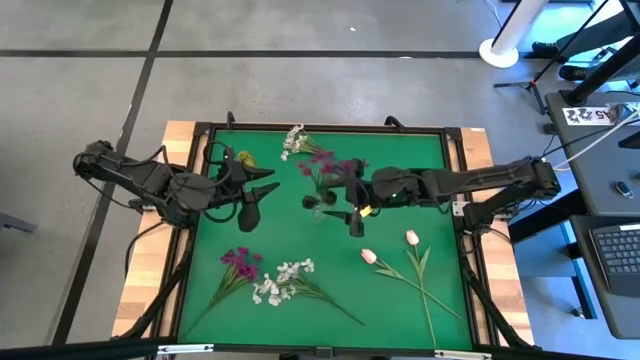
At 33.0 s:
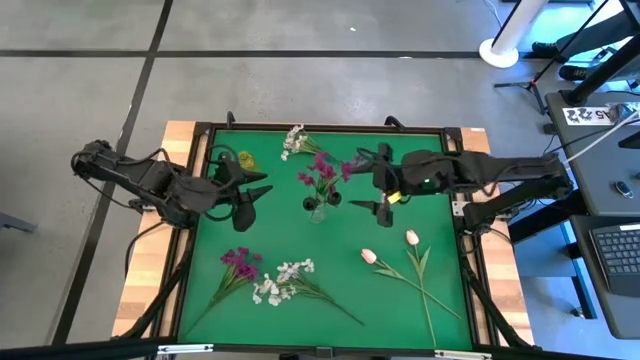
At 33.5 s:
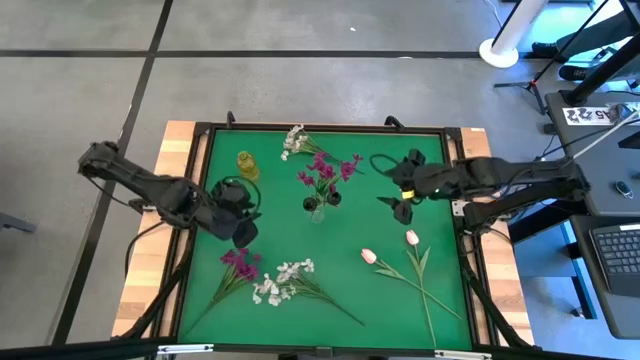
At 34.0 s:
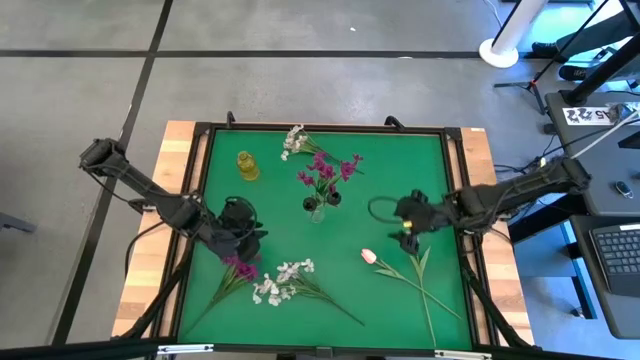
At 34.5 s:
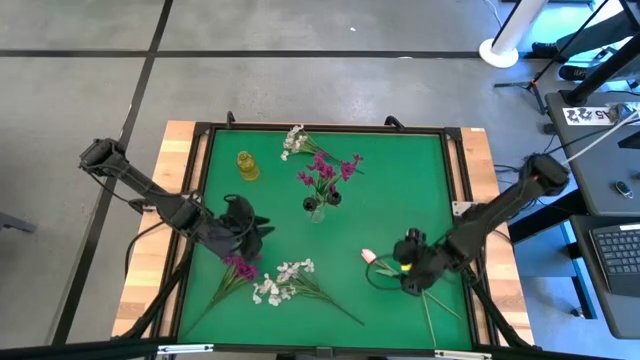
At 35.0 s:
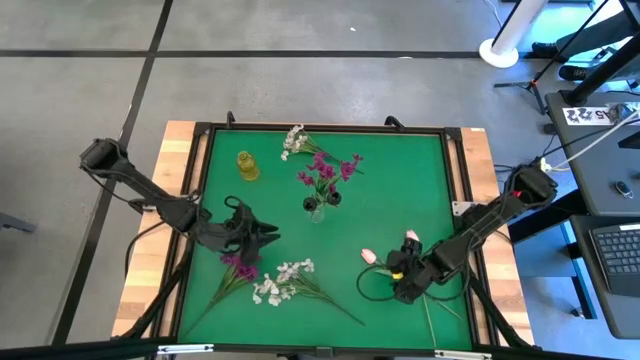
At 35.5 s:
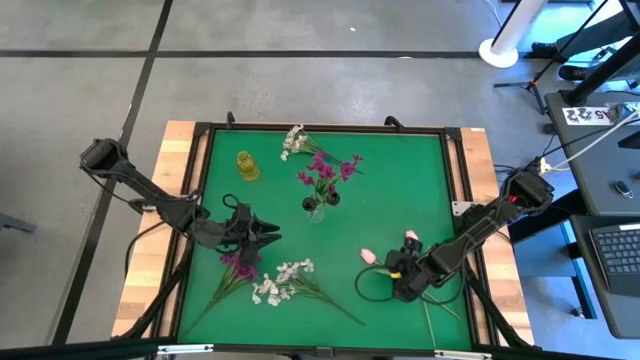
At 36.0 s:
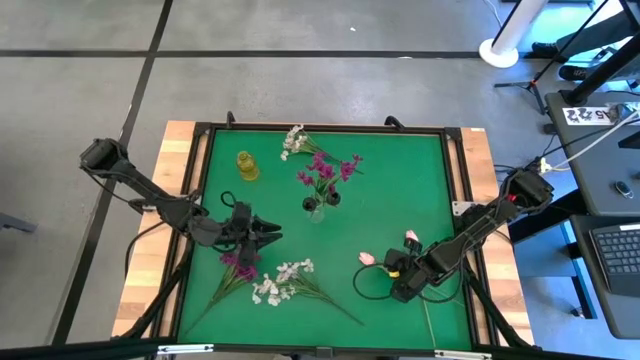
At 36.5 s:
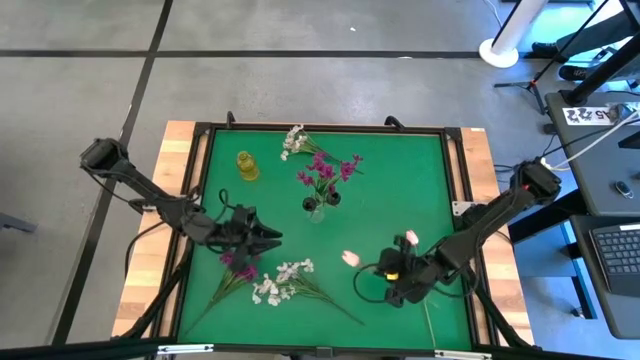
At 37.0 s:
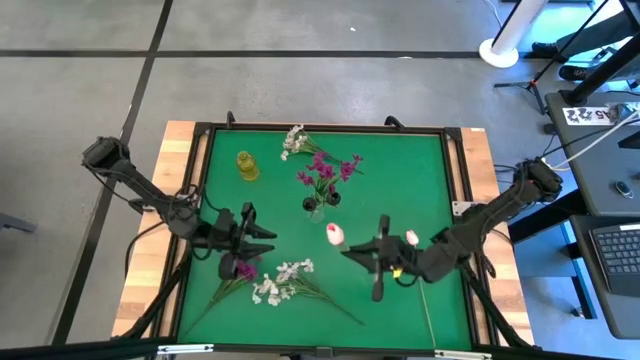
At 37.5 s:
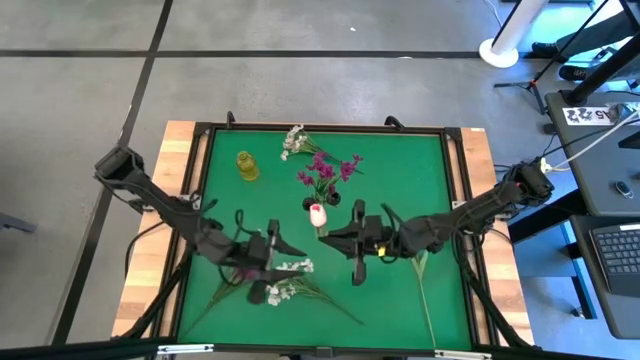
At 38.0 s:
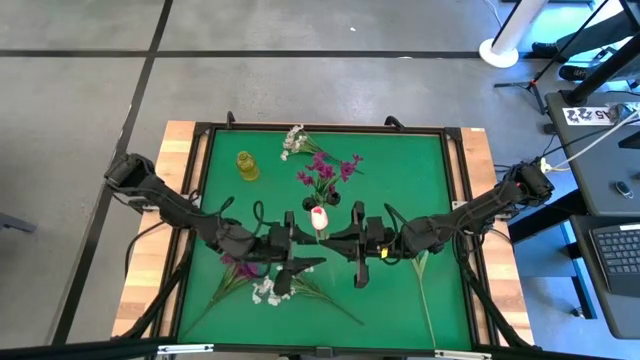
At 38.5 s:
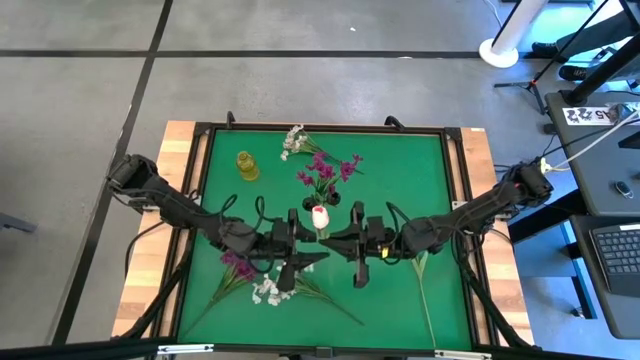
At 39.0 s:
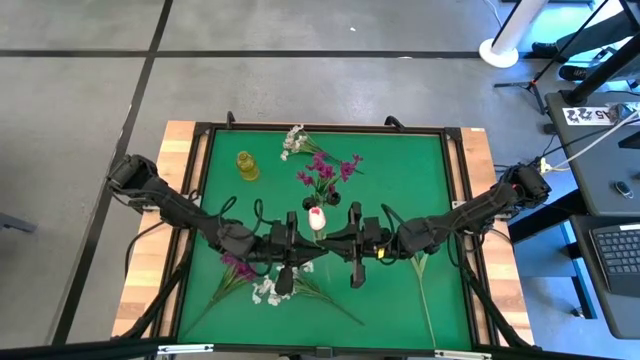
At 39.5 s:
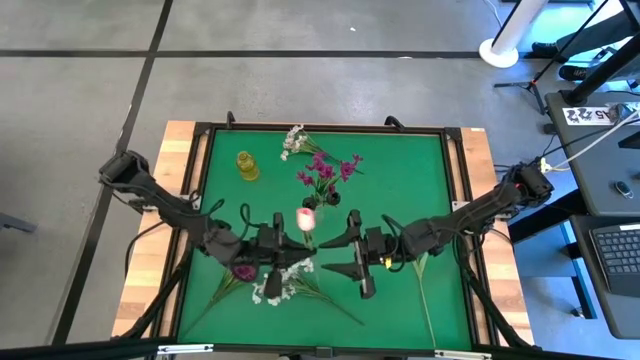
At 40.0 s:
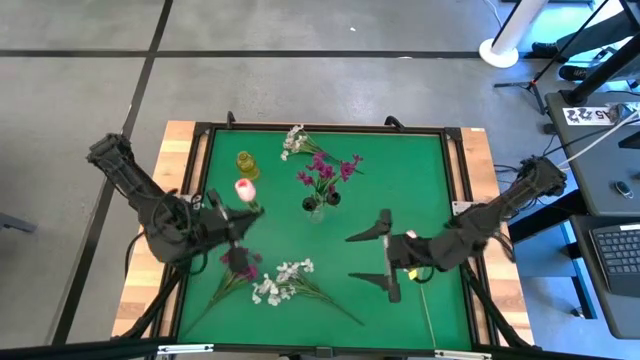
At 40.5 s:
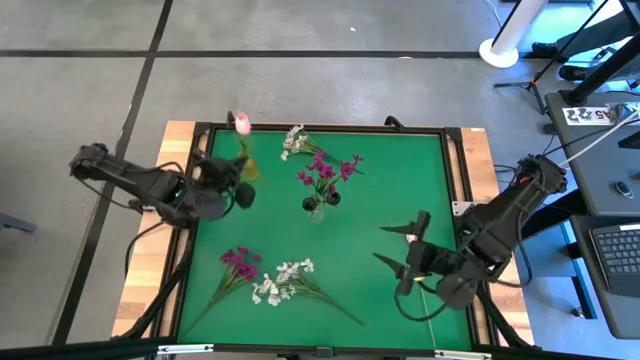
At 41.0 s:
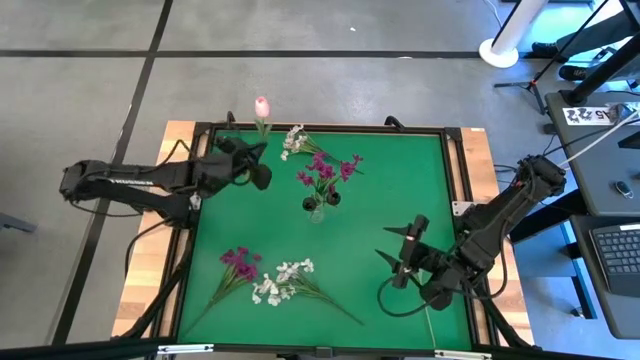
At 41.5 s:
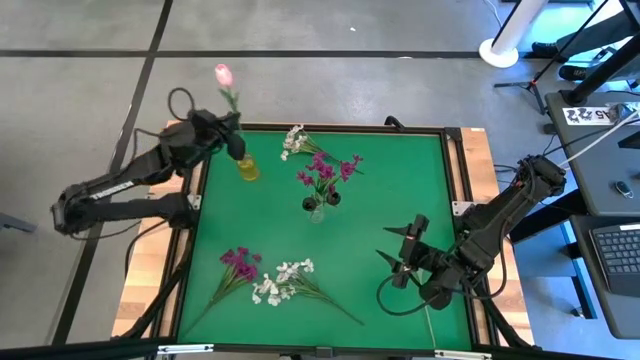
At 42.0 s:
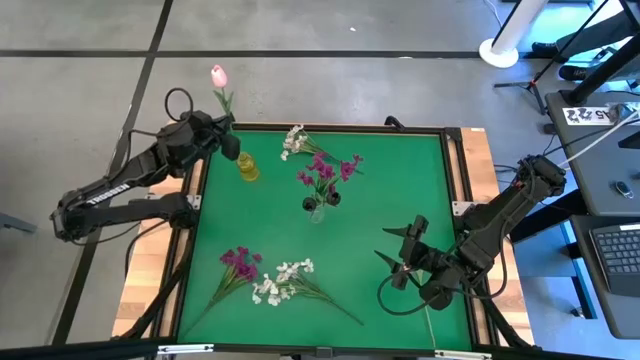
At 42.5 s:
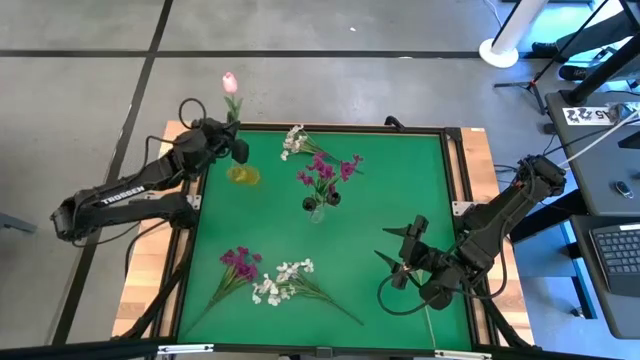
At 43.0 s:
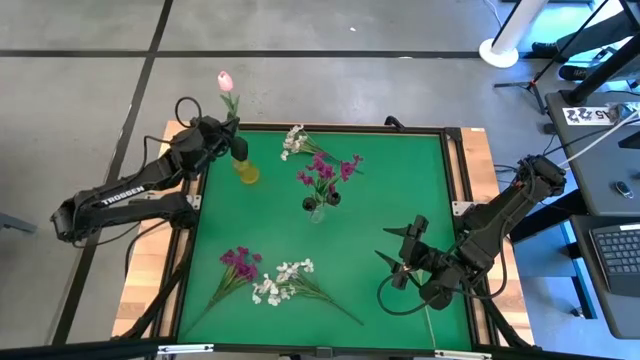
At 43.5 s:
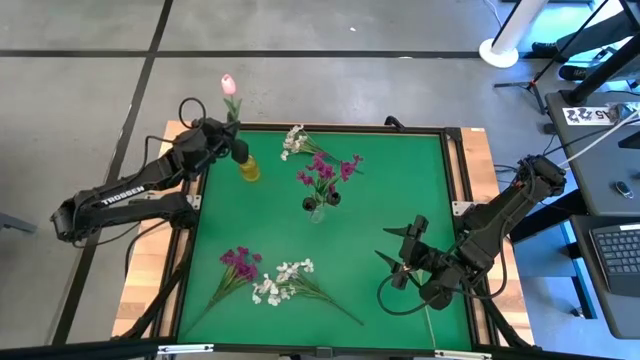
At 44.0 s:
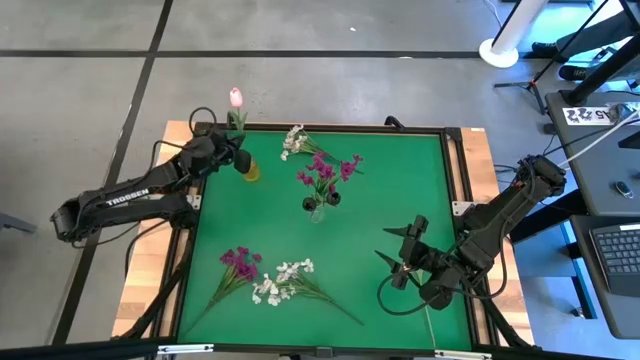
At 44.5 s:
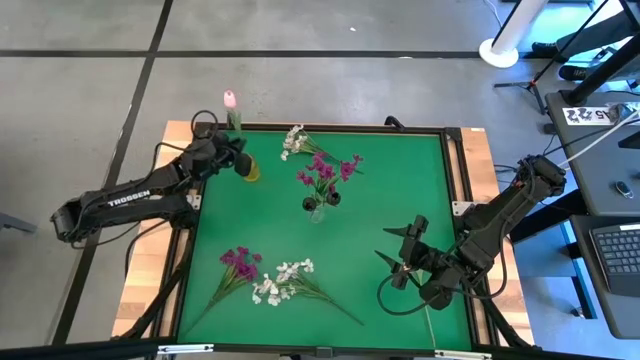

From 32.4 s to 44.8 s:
Task: Sort flowers into vase by color
Put the left pink tulip into the yellow vase

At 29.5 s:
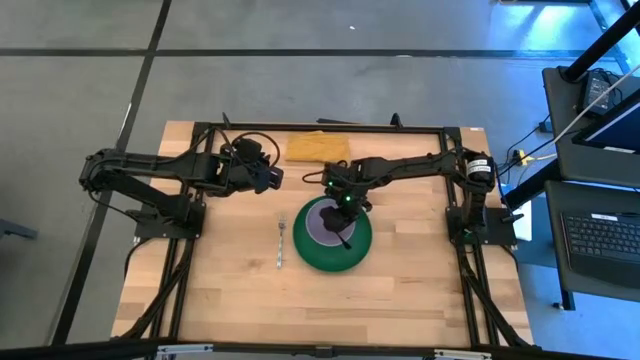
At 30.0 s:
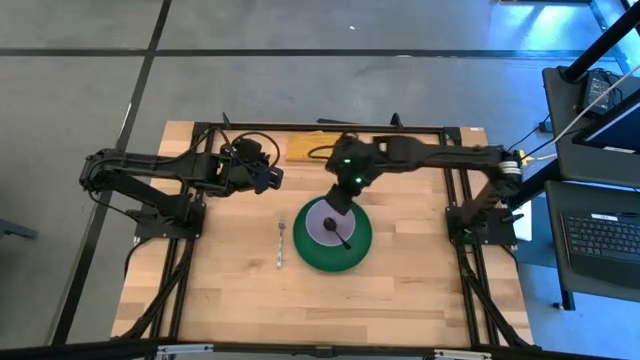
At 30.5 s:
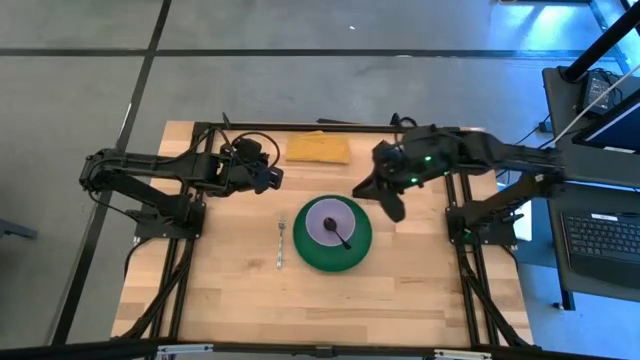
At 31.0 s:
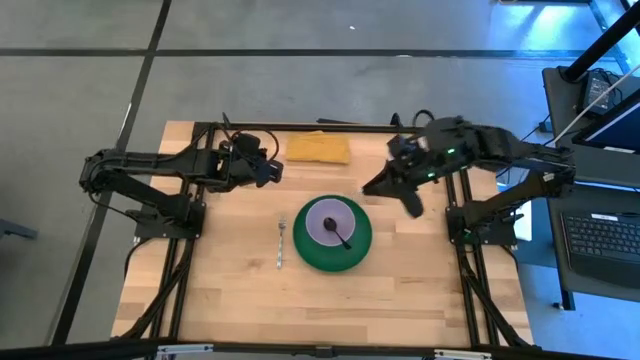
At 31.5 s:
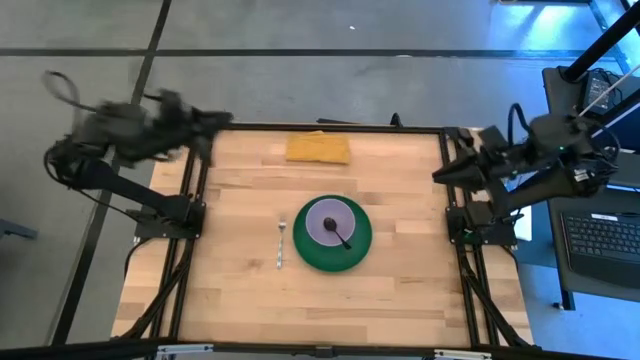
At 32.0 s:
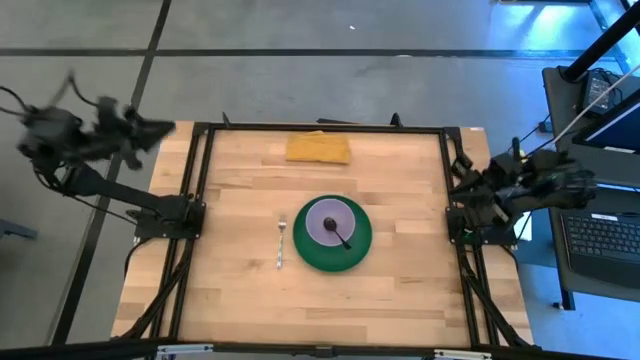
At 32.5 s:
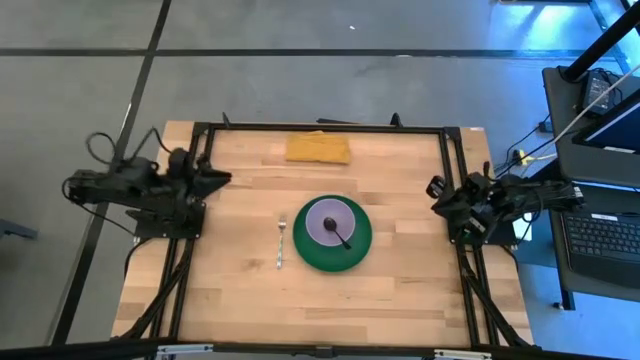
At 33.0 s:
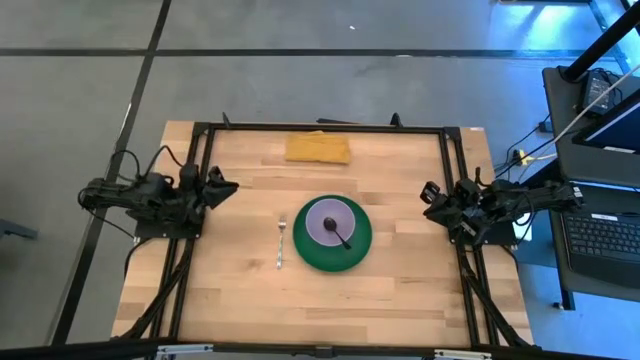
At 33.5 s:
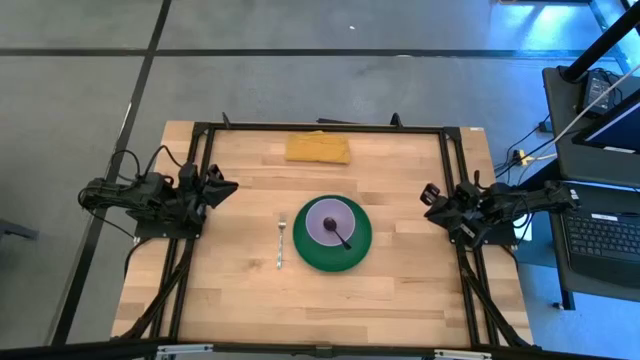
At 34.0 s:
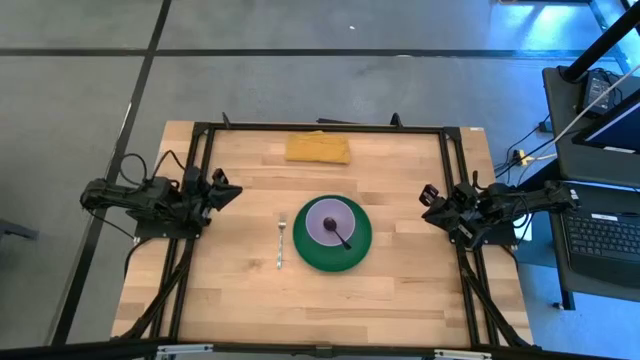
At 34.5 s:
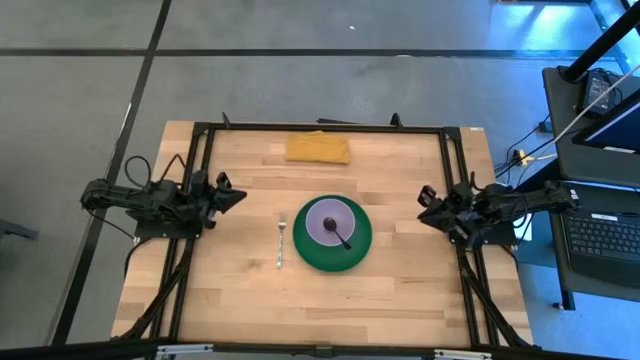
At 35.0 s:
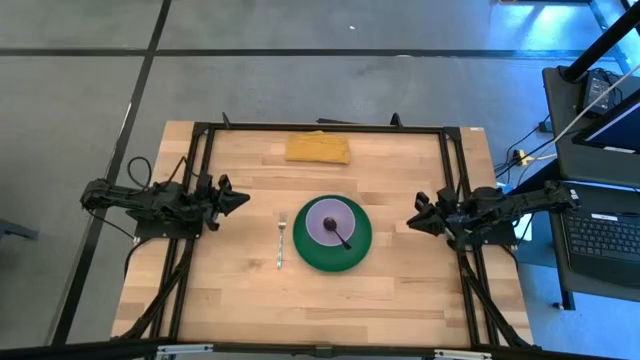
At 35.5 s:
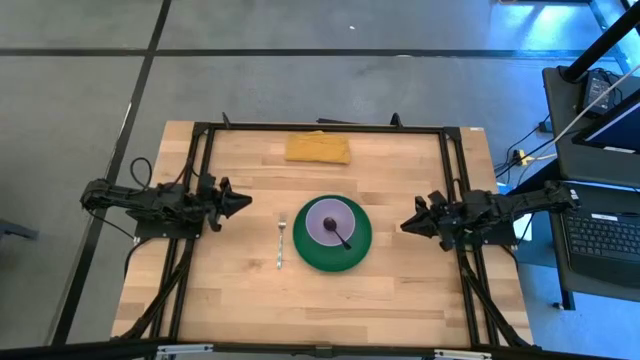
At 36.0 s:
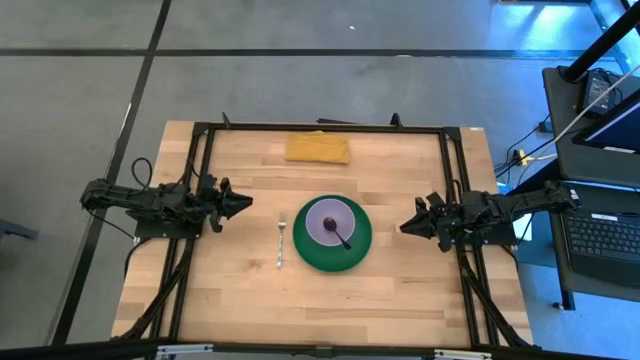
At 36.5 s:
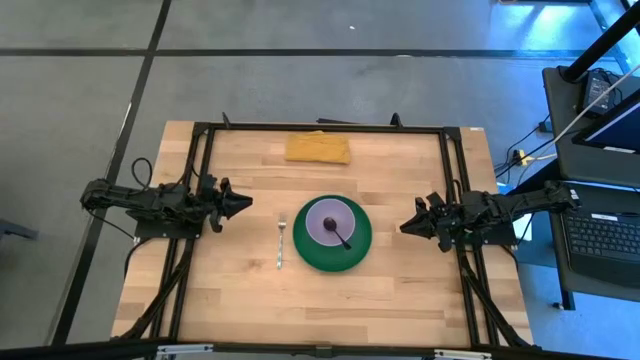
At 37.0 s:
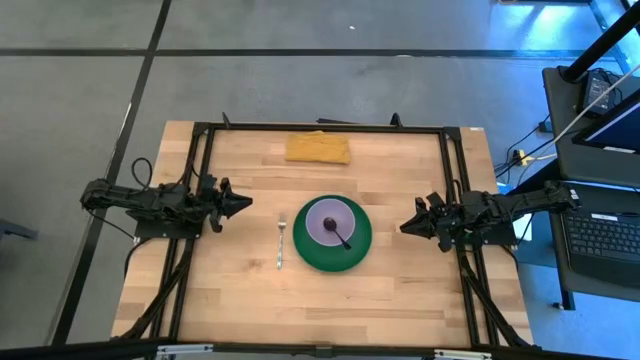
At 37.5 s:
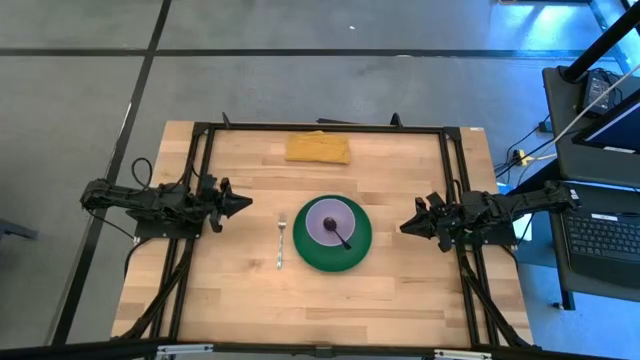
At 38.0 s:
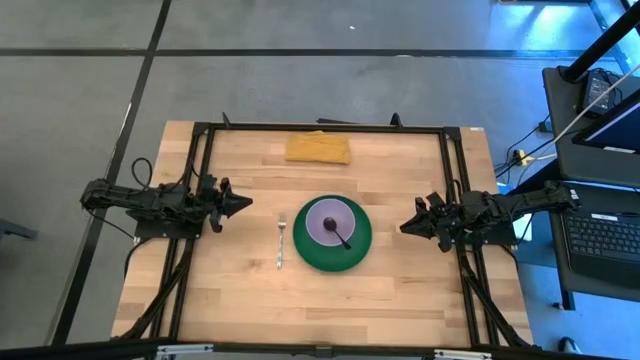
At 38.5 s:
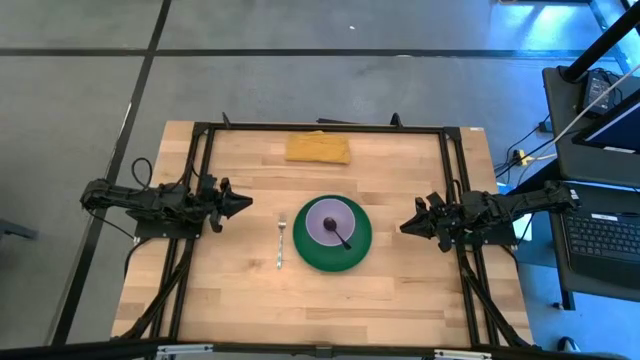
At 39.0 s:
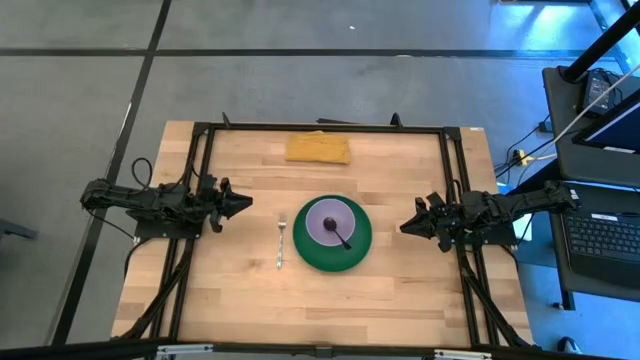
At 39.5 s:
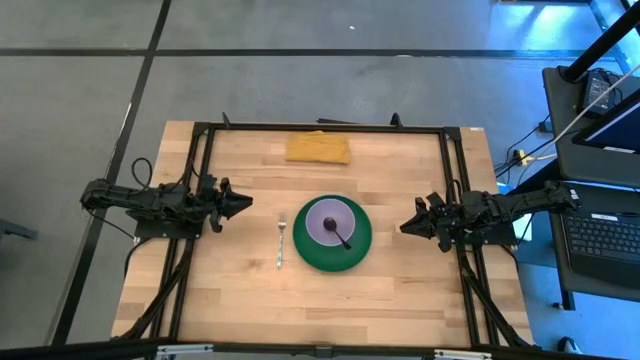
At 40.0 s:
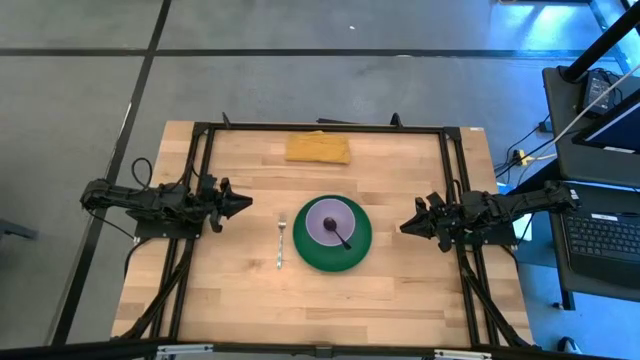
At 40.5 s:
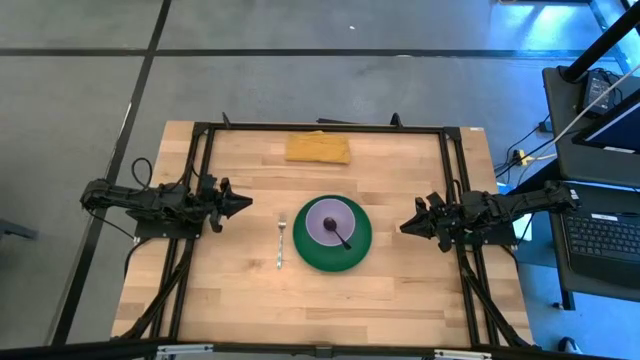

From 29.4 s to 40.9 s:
Task: Set table place
Return to Home Position
